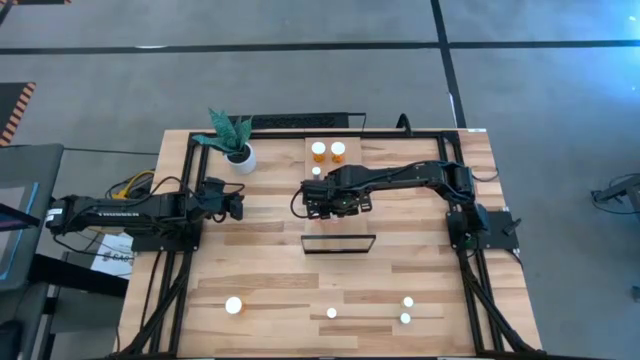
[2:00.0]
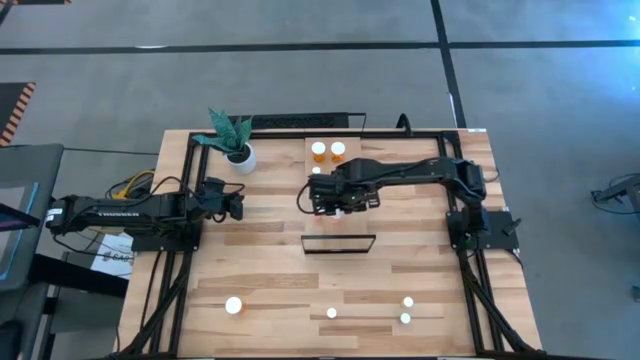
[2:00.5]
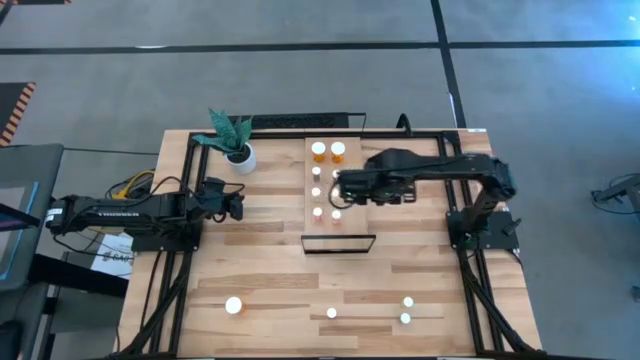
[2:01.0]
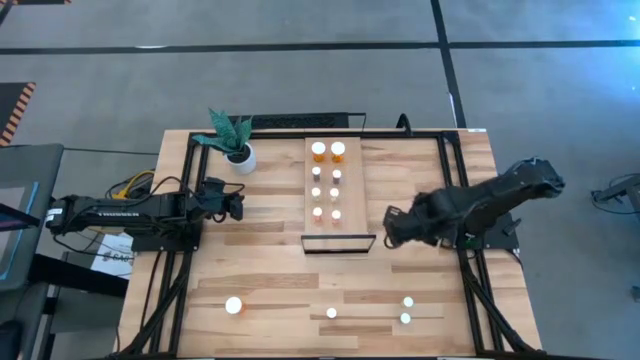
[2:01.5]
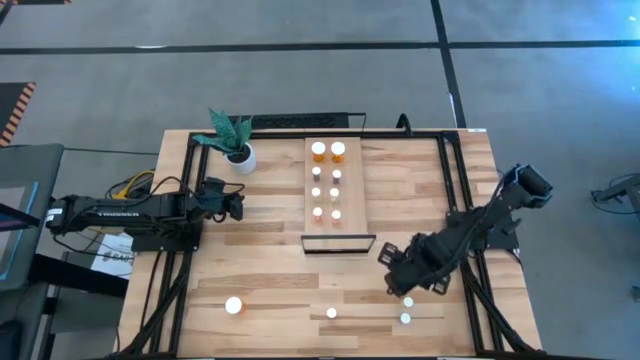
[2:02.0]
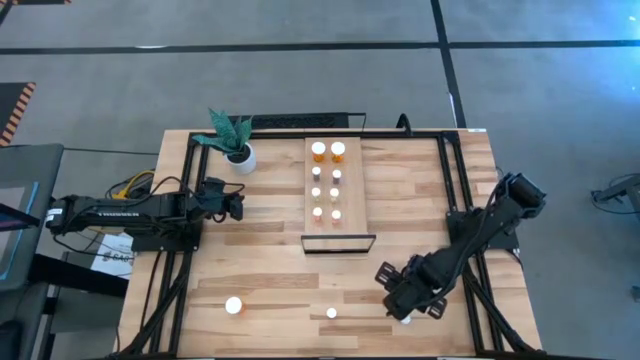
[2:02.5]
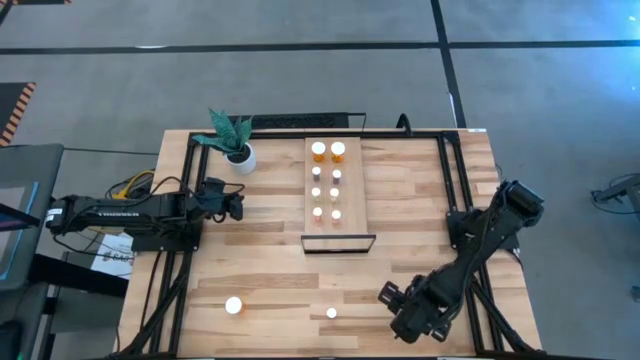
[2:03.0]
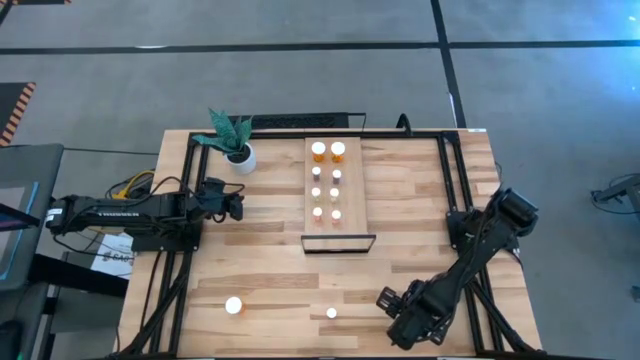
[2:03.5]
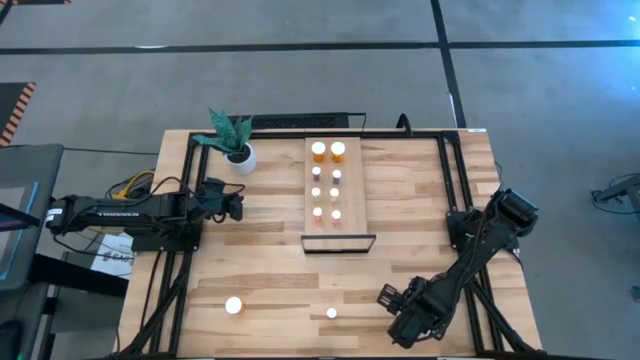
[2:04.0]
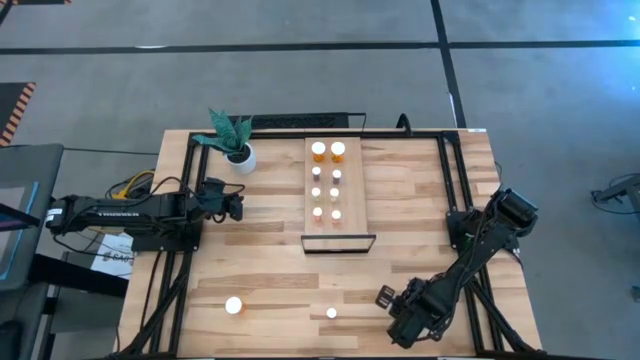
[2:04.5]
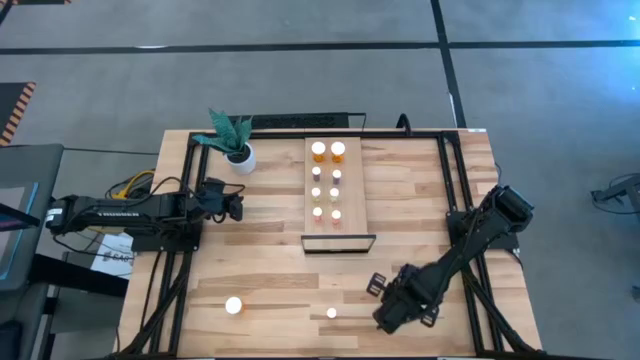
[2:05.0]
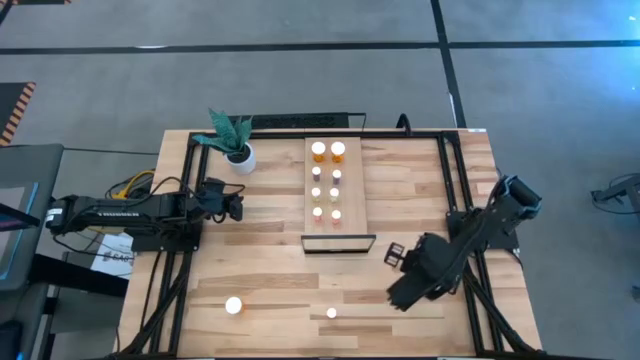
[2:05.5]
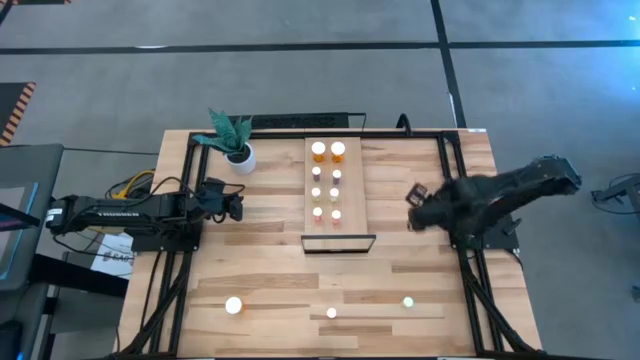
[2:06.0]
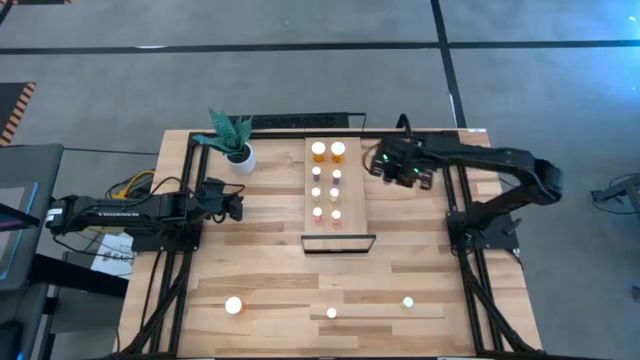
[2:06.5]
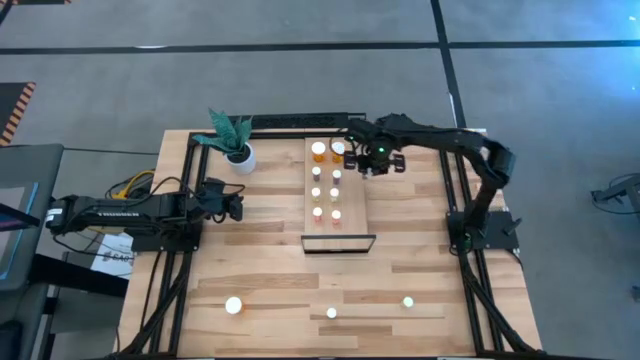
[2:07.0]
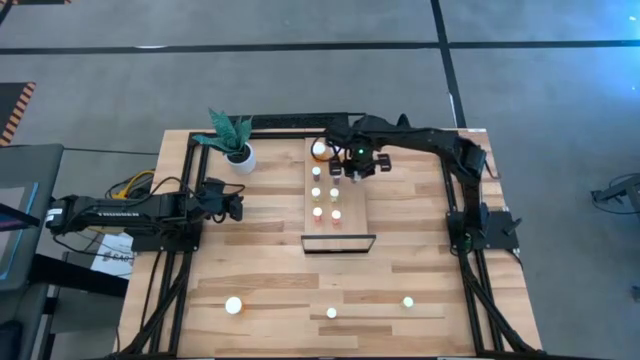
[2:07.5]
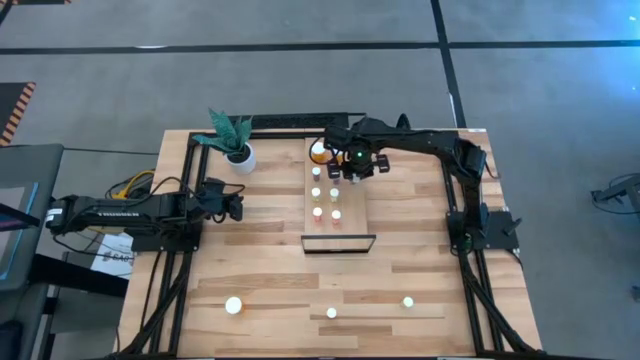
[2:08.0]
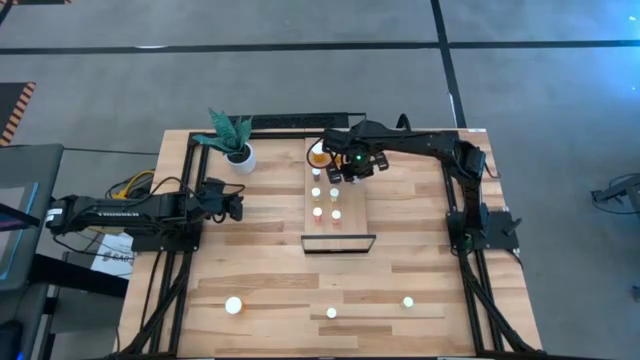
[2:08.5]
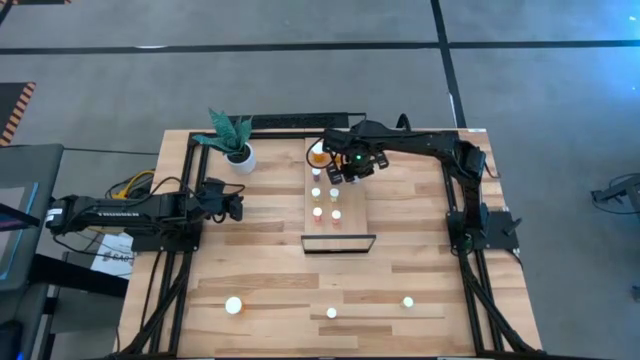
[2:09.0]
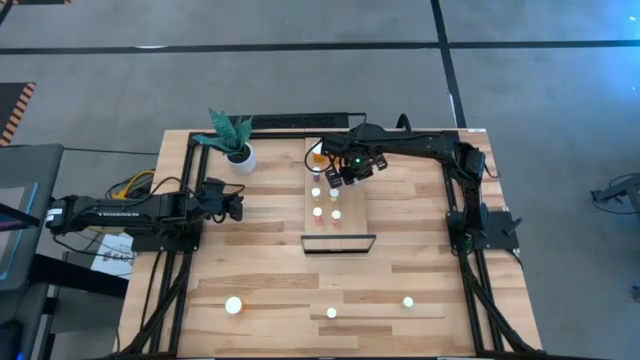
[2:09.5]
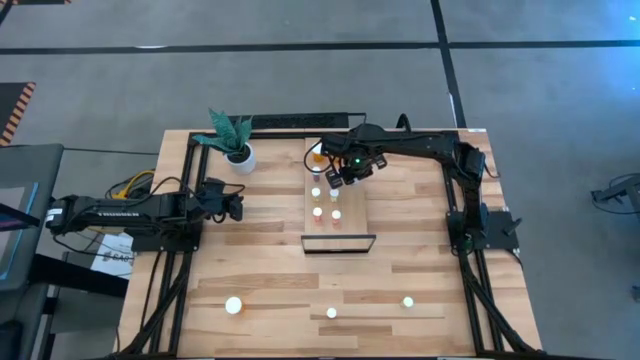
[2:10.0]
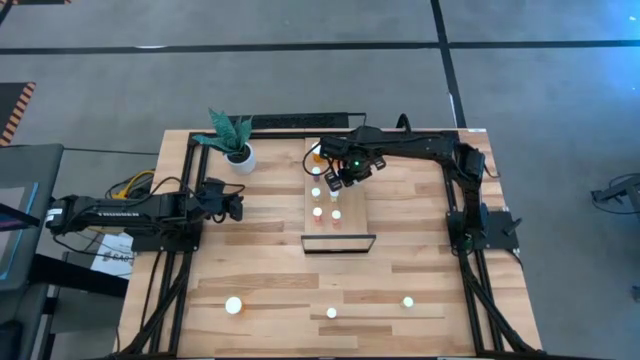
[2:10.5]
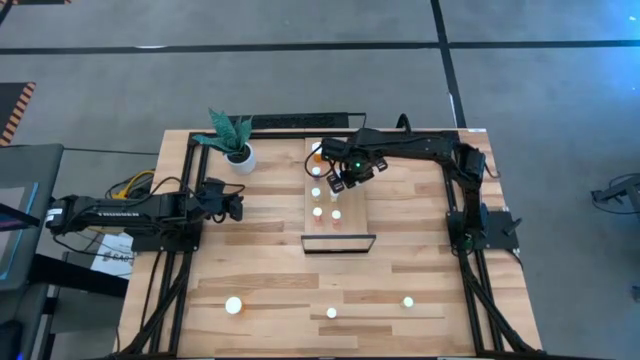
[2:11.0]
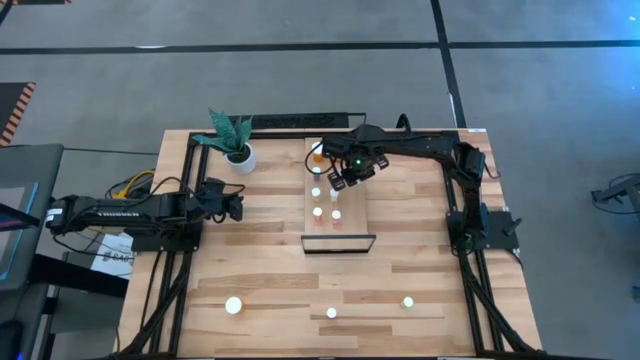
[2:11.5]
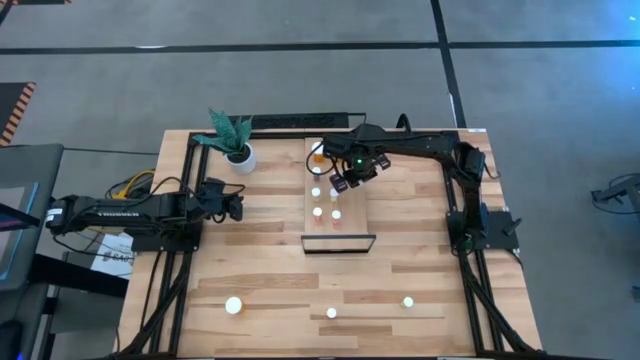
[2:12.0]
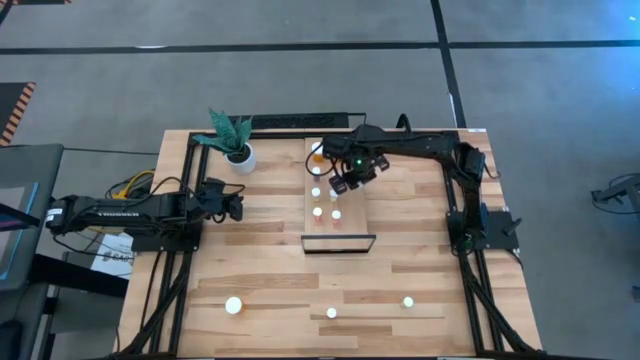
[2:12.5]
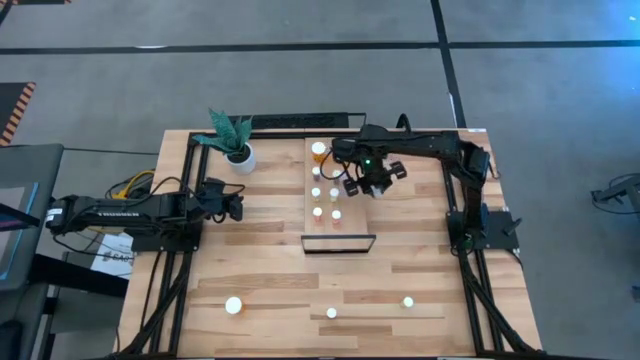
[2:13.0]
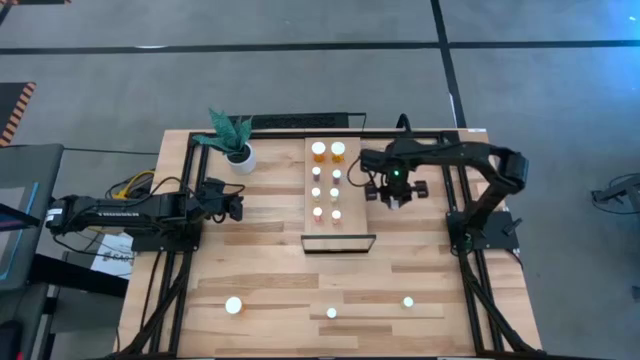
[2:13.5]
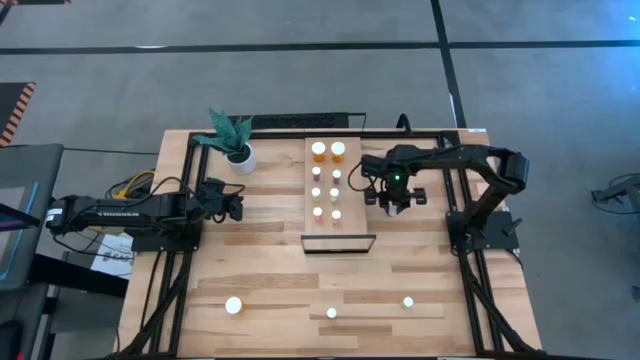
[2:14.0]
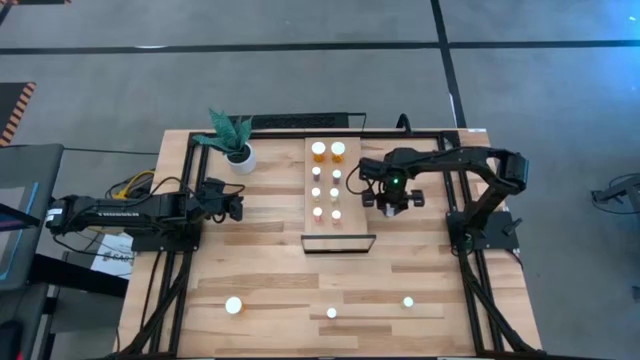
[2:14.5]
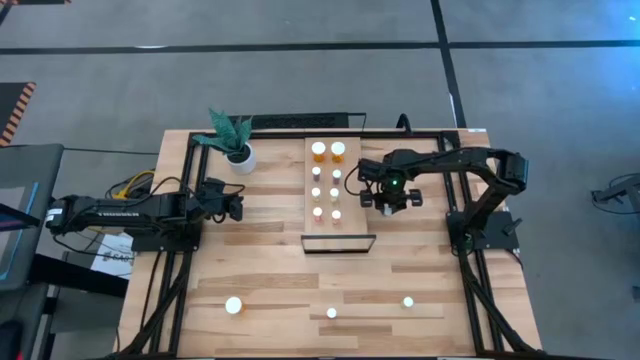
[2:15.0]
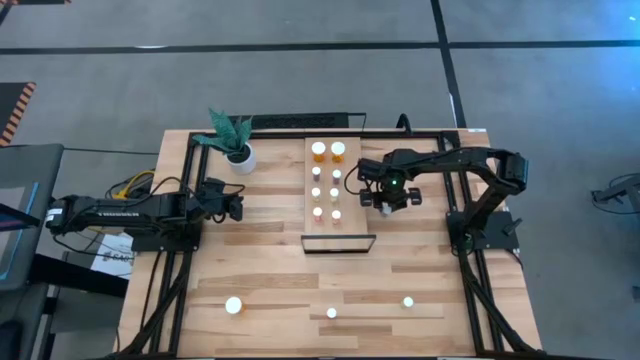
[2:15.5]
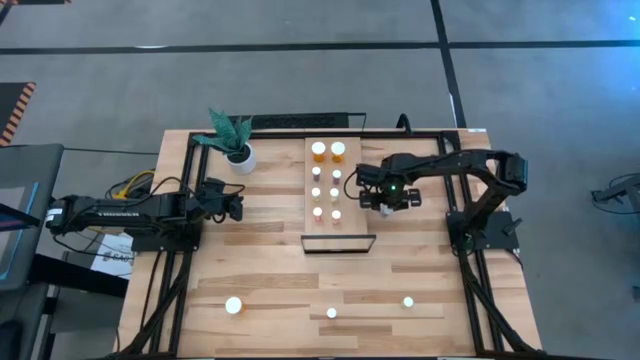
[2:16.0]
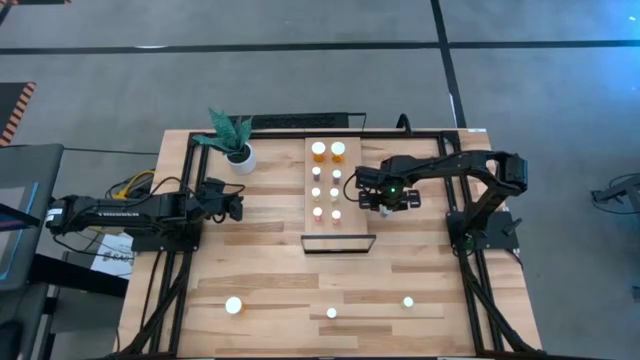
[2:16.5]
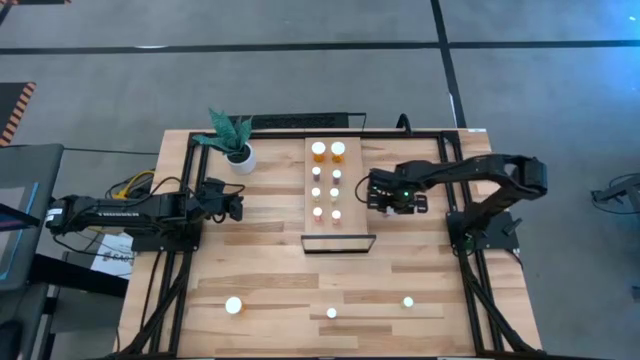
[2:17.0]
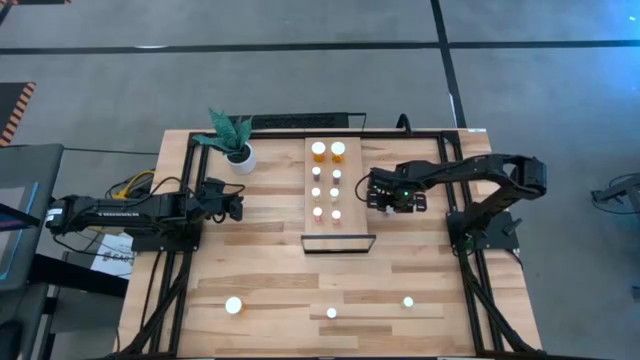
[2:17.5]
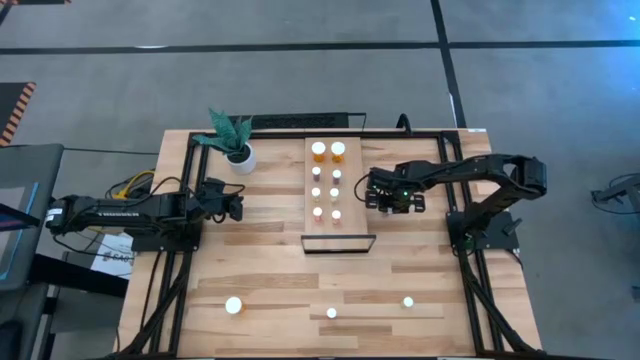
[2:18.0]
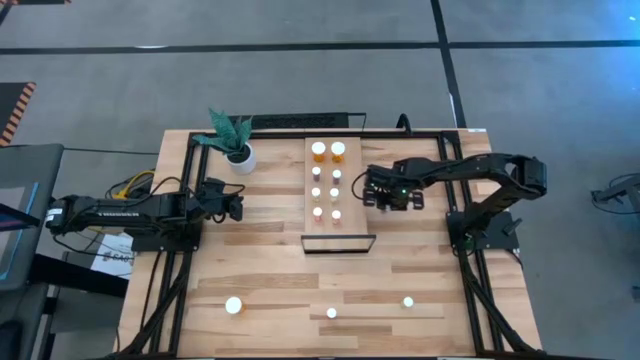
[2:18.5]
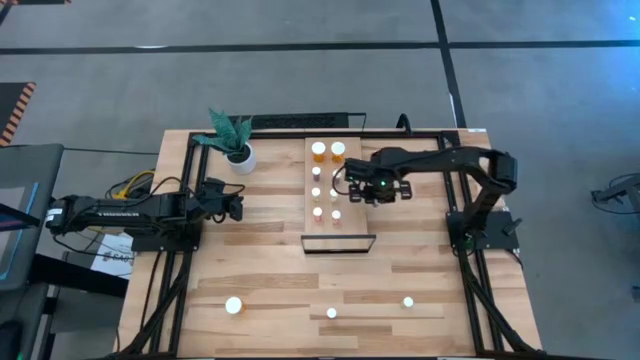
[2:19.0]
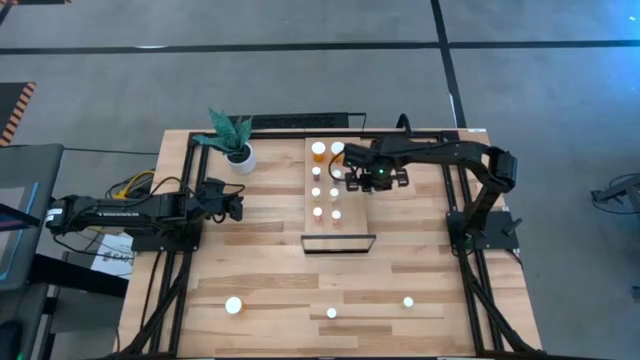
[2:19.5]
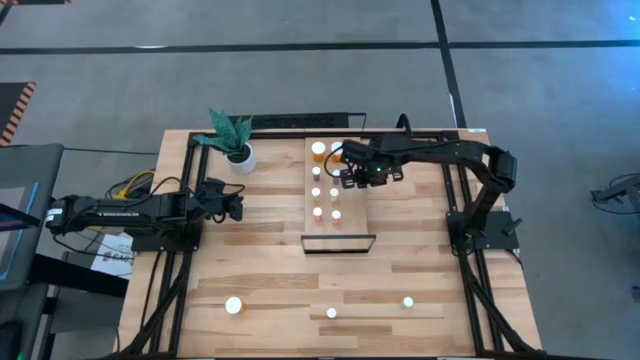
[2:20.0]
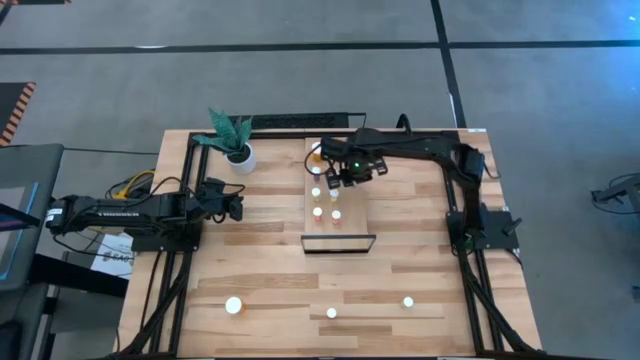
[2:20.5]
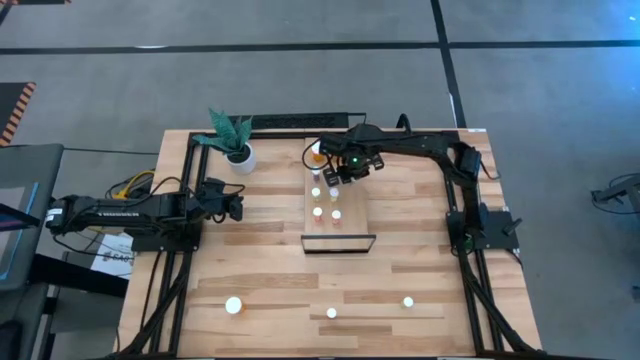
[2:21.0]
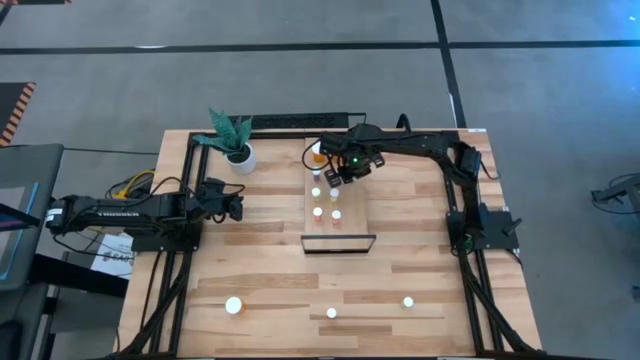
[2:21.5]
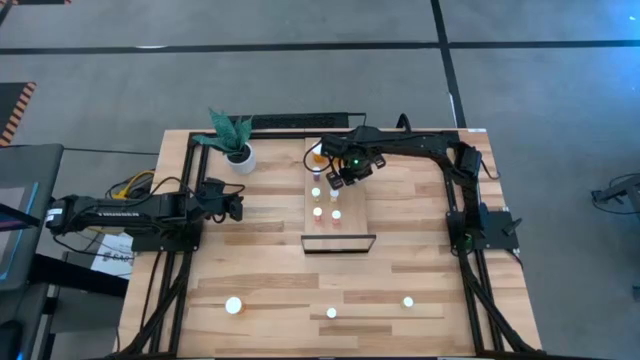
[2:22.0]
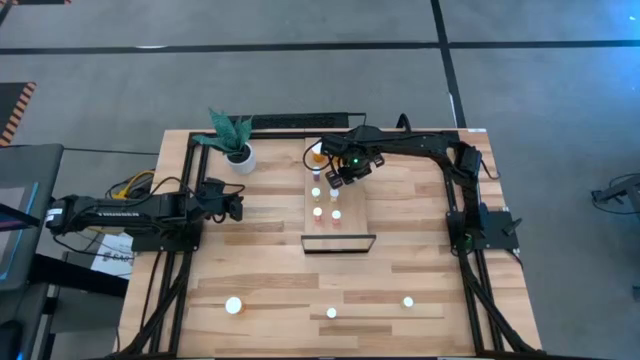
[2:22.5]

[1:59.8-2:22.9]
Task: Pick and place medicine bottles onto shelf by color
Put the blue pill bottle on the shelf aligned with the other blue pill bottles
